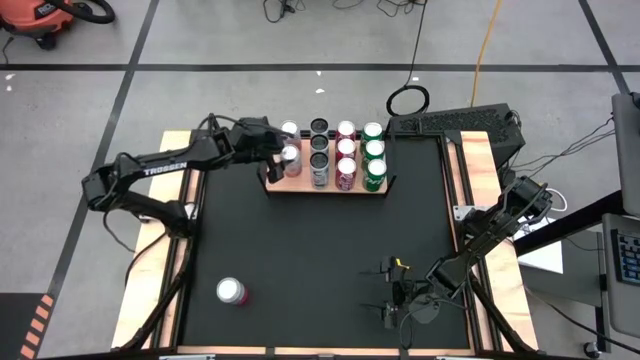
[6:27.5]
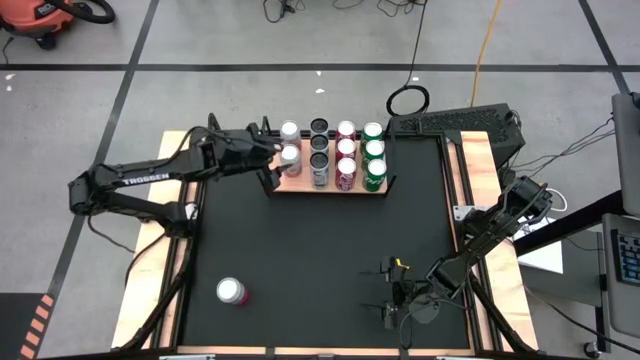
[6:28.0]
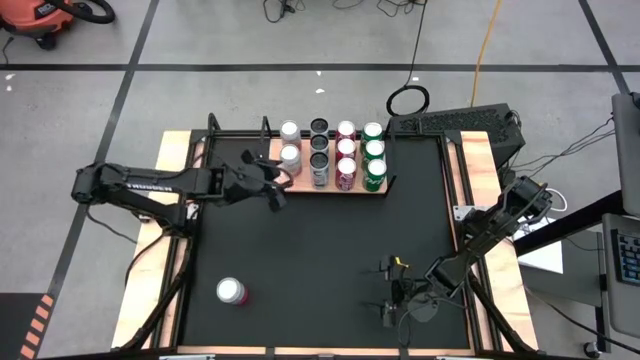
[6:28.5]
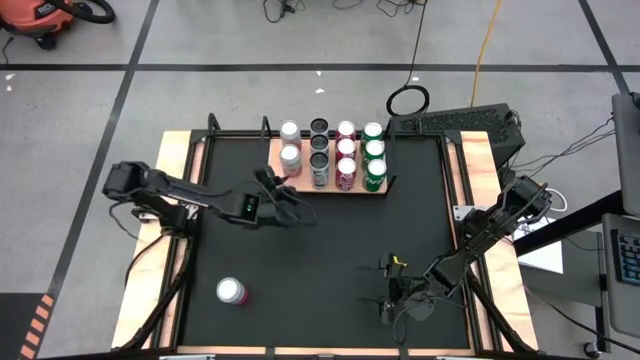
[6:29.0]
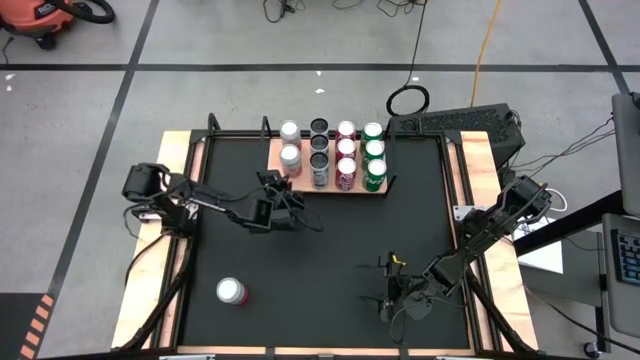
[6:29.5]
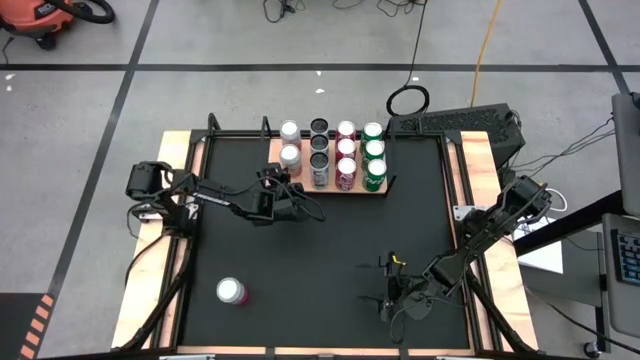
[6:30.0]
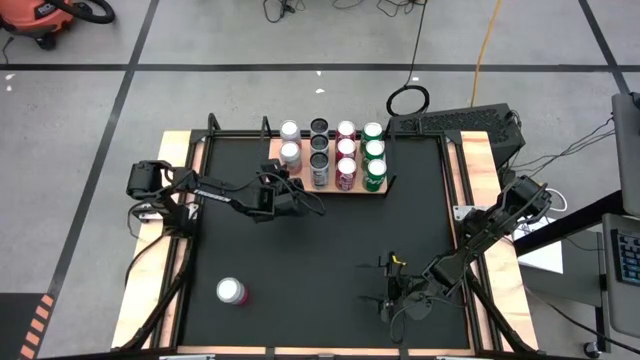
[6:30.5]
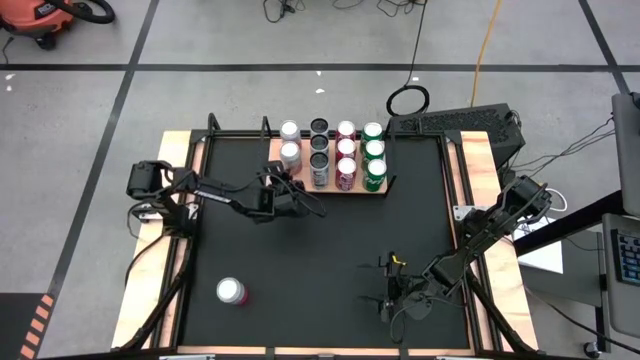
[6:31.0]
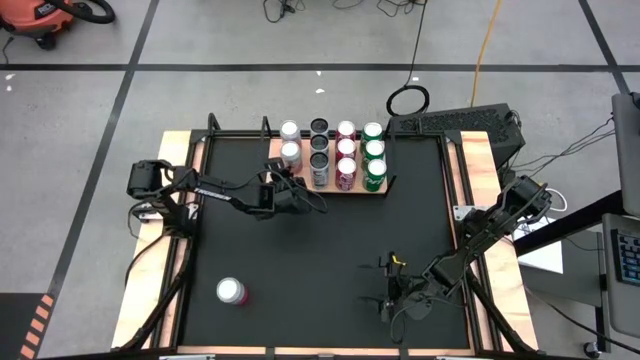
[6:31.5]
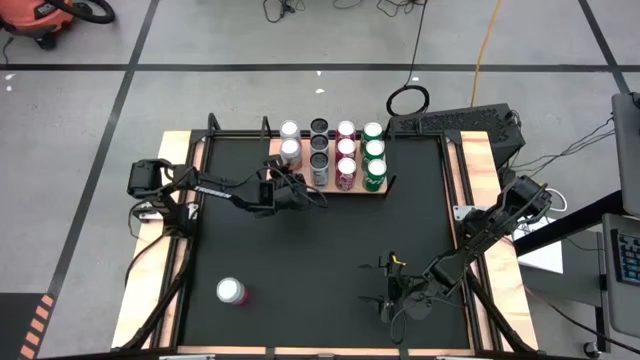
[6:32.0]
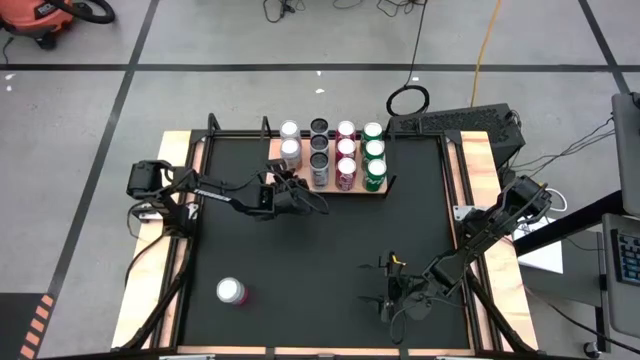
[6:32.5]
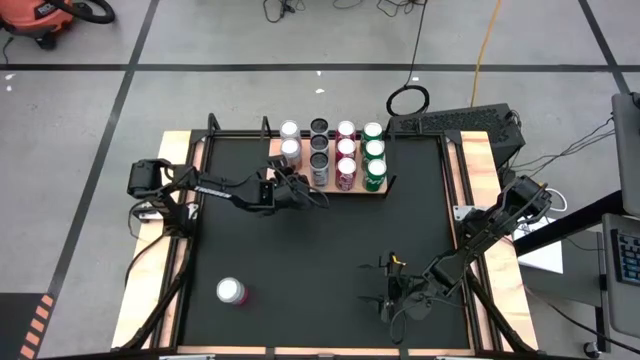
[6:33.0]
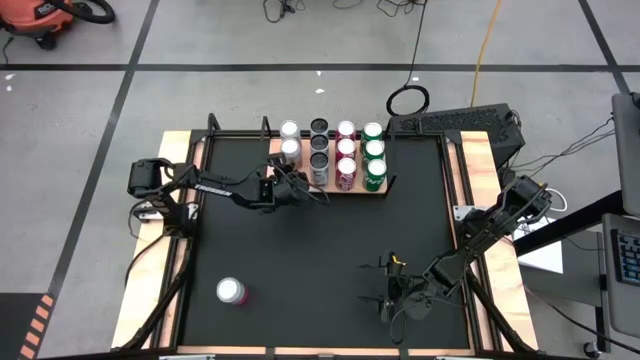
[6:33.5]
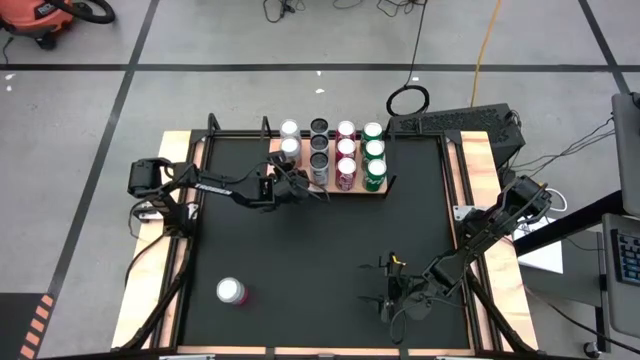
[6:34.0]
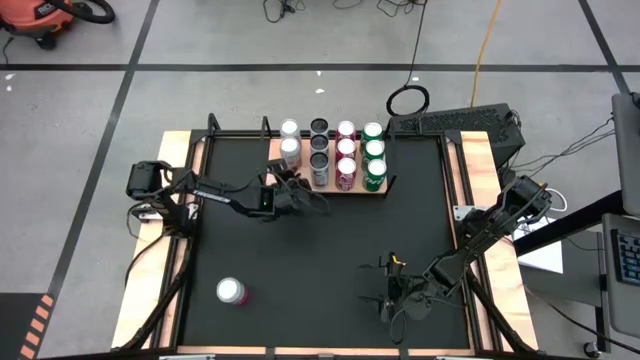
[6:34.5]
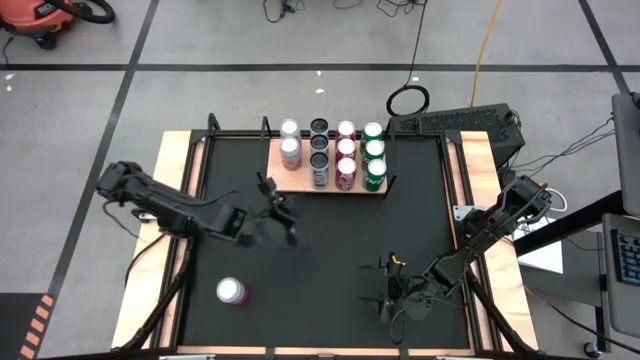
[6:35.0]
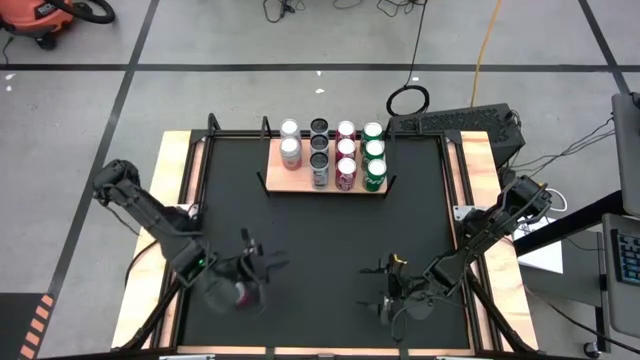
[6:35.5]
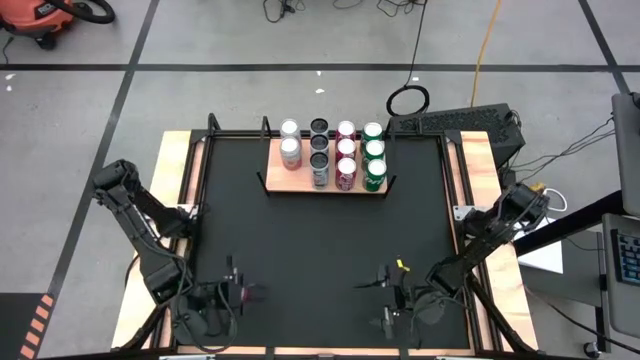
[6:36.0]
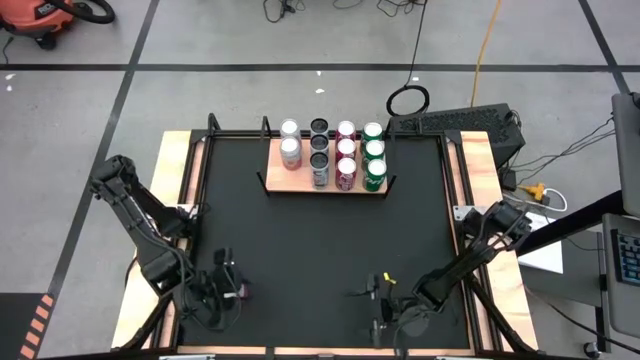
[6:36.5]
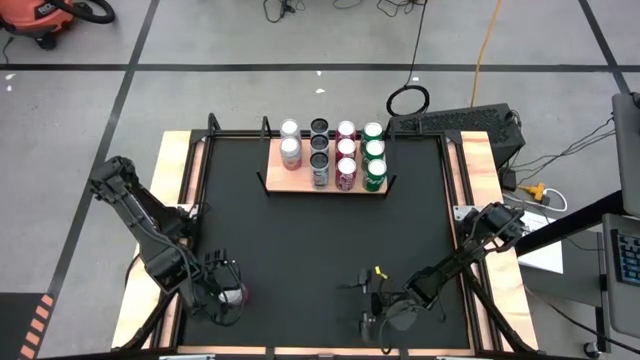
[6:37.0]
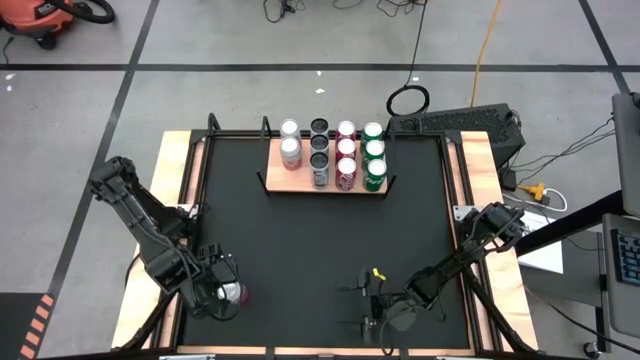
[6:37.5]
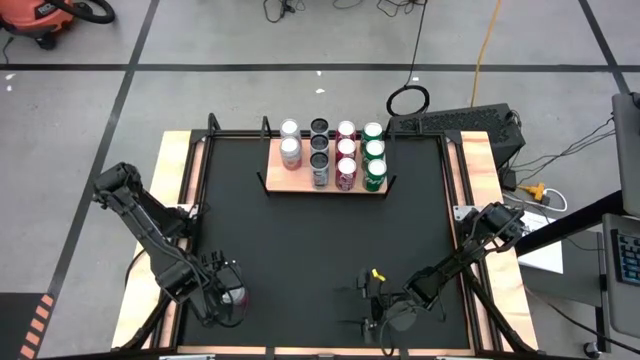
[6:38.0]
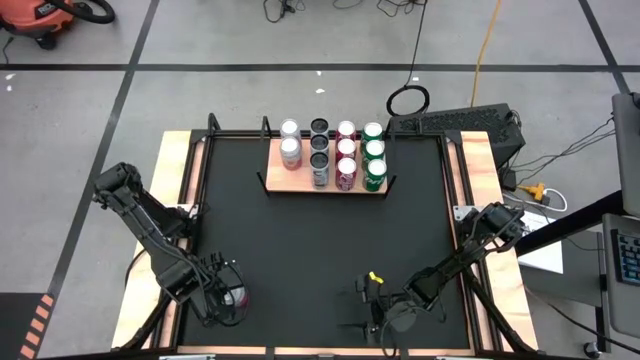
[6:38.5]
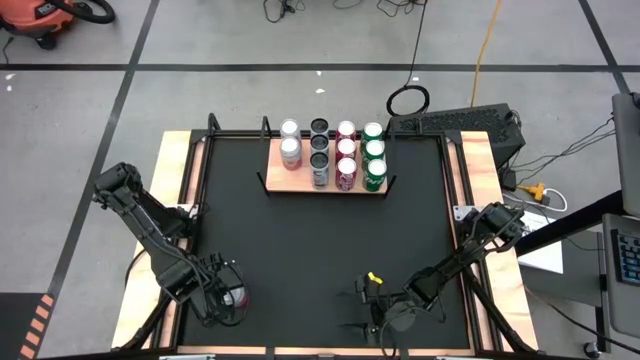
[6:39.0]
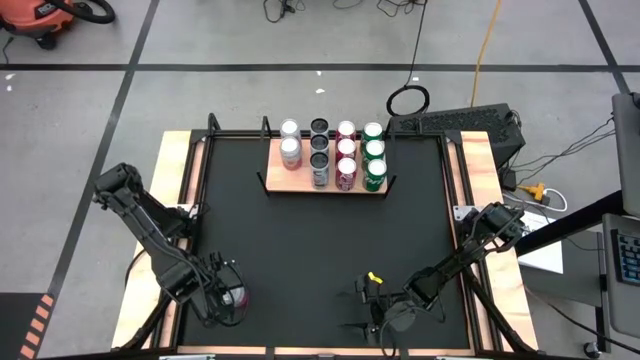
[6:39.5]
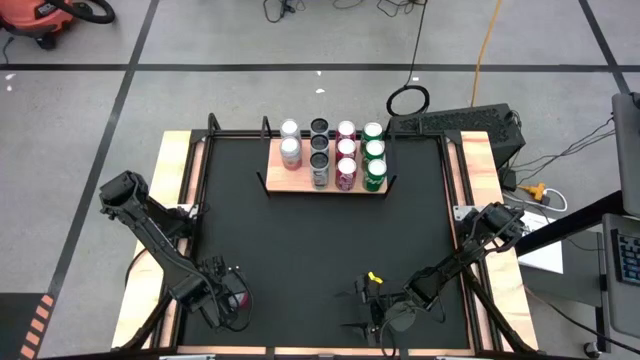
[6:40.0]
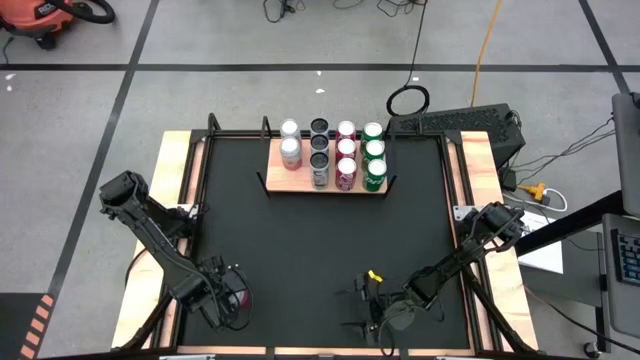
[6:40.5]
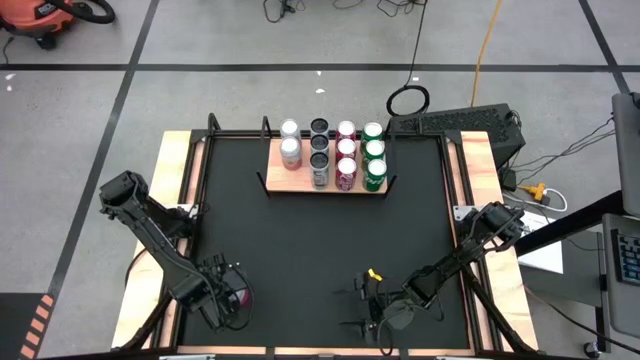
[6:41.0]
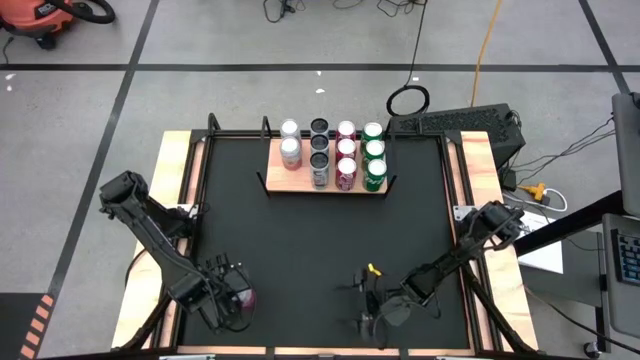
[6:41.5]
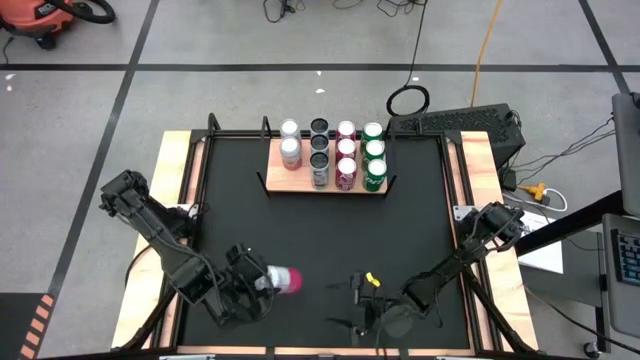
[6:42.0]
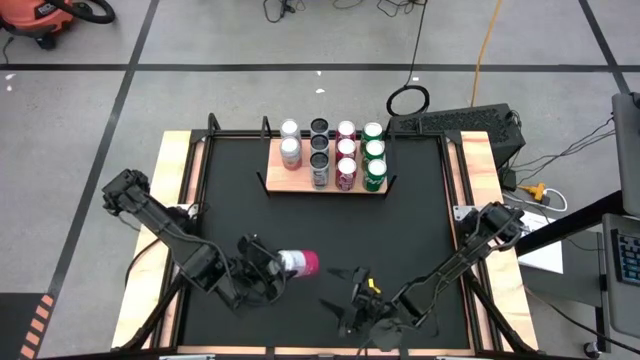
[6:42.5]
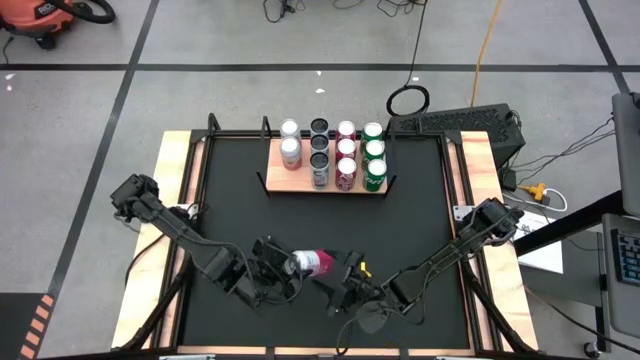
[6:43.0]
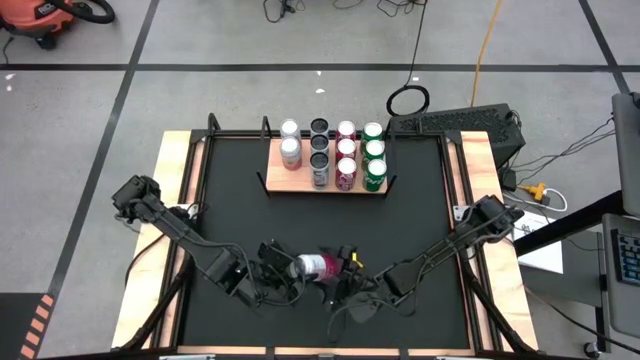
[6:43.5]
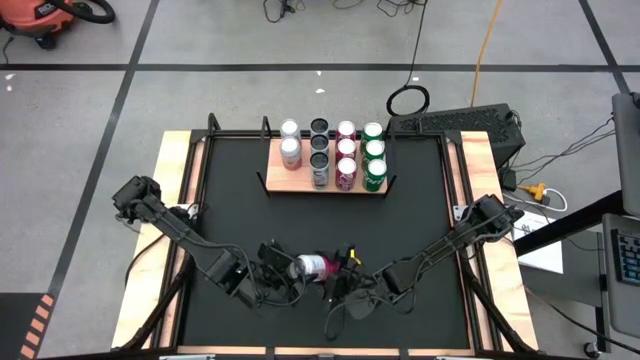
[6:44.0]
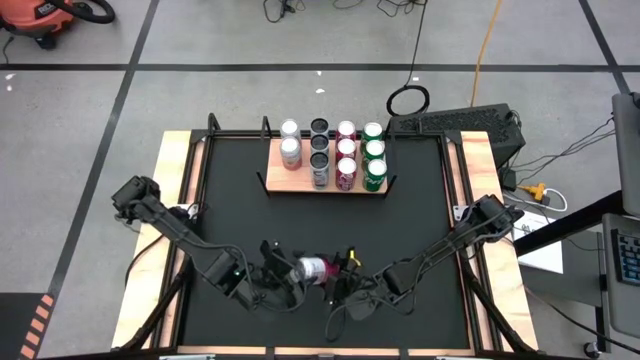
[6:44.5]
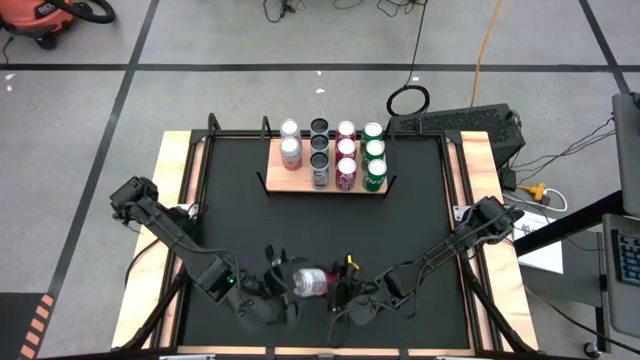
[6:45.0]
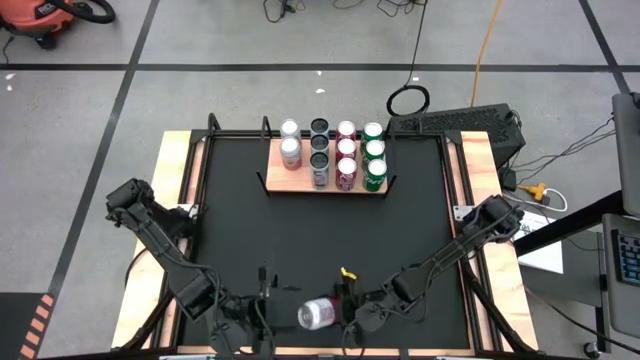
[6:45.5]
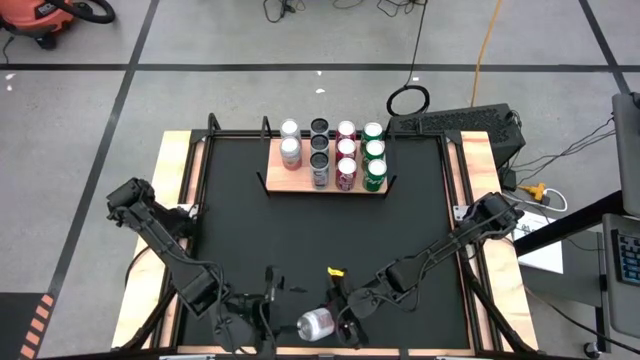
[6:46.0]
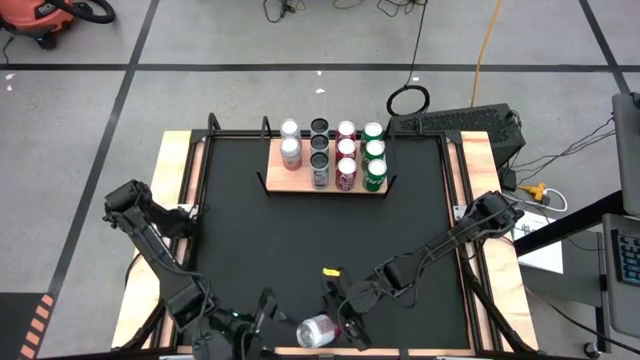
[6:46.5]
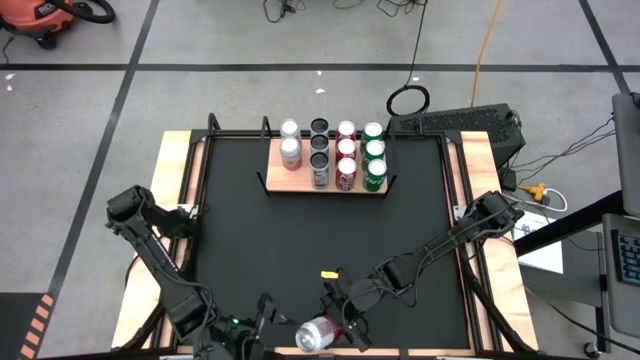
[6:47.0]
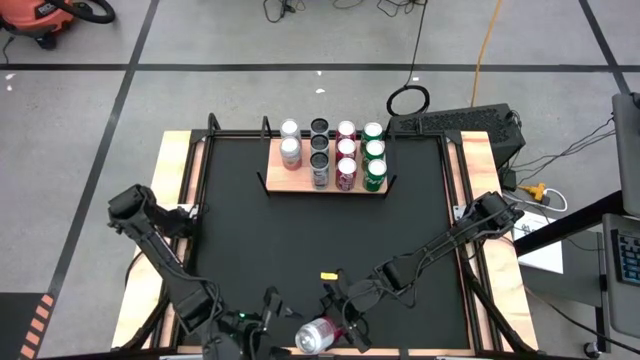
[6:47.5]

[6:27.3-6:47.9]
Task: Place canned beverage on shelf
Put the pink soda can on the shelf

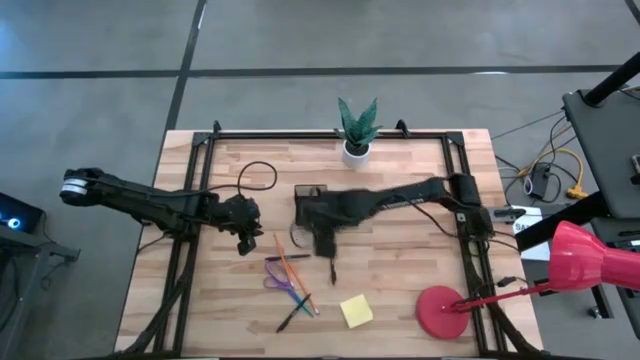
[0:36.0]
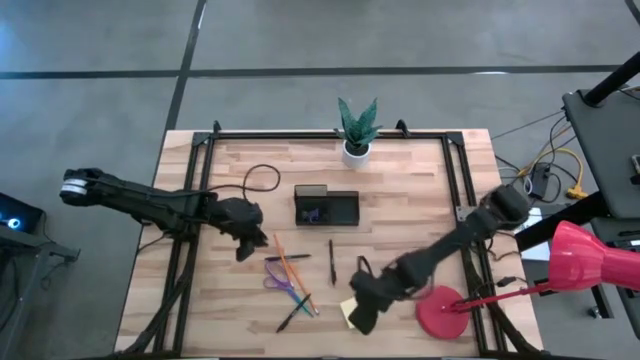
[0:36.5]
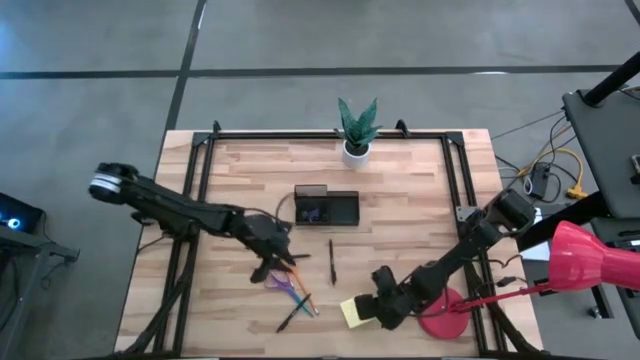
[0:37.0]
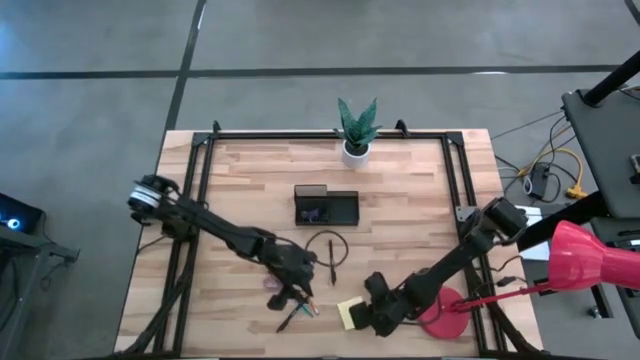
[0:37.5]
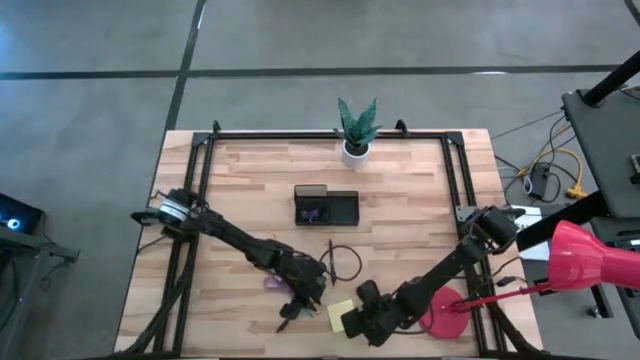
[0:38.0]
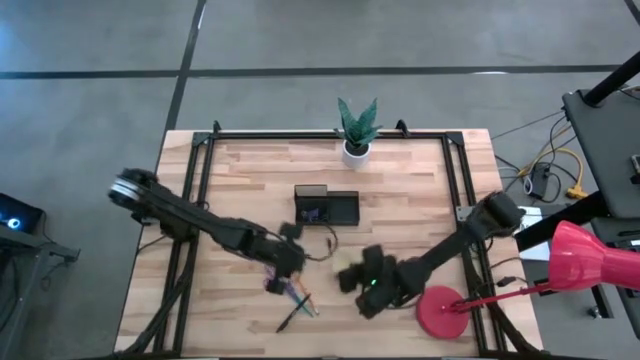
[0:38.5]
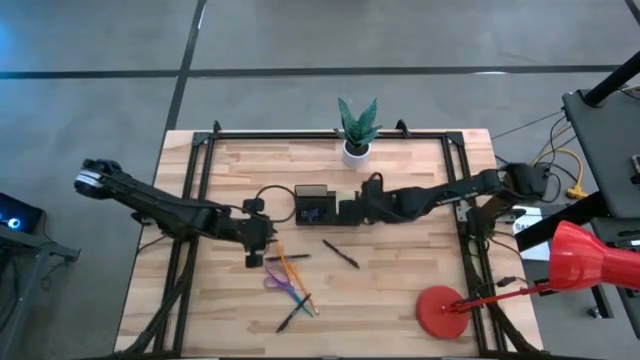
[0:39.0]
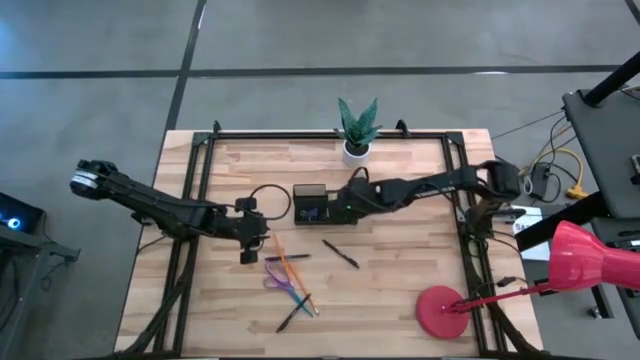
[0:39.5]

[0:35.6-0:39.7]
Task: Pick and place office supplies into organizer
Put the sticky note into the desk organizer
